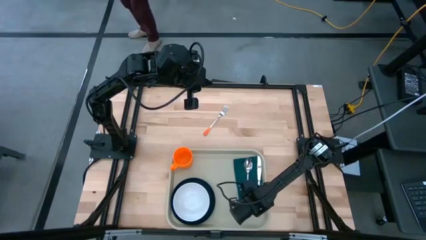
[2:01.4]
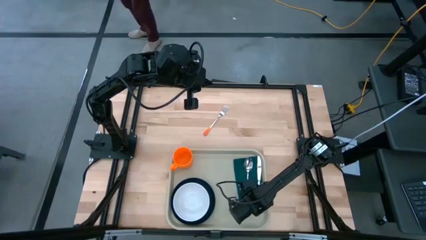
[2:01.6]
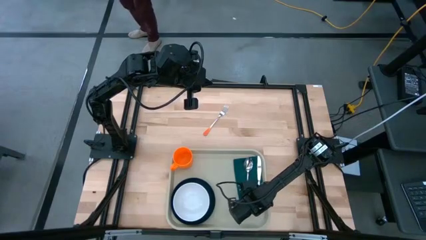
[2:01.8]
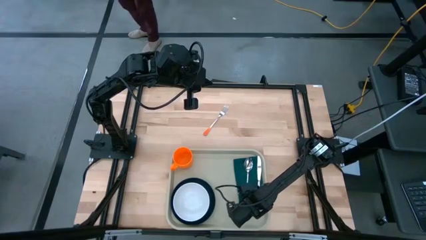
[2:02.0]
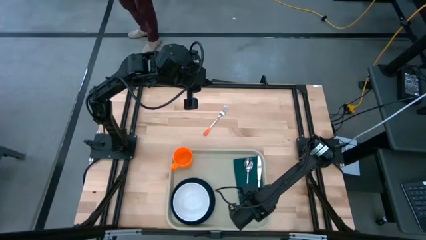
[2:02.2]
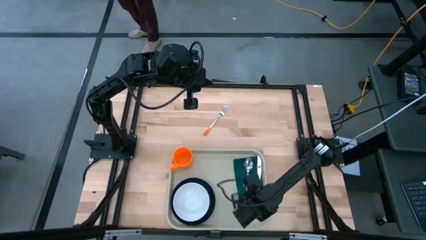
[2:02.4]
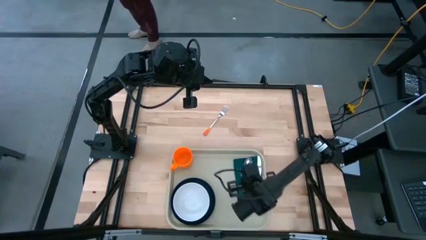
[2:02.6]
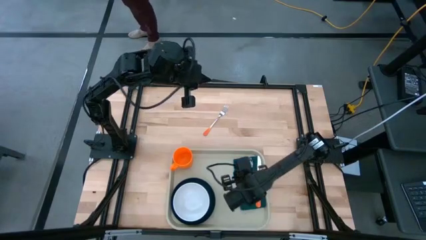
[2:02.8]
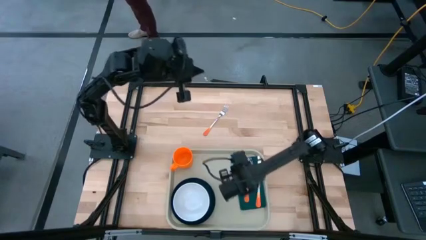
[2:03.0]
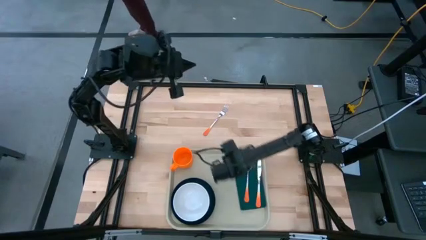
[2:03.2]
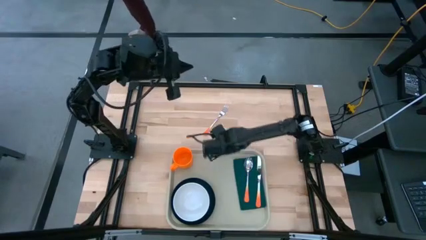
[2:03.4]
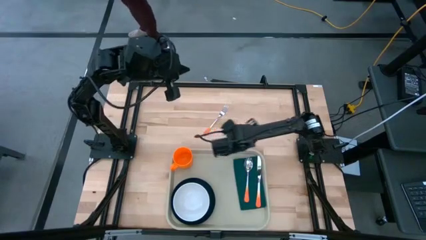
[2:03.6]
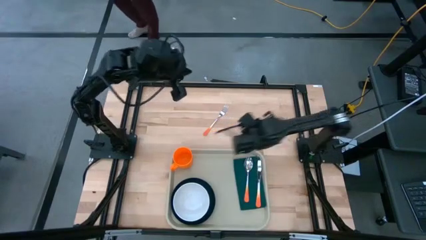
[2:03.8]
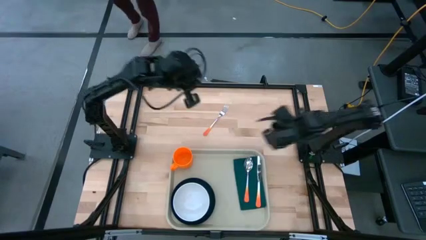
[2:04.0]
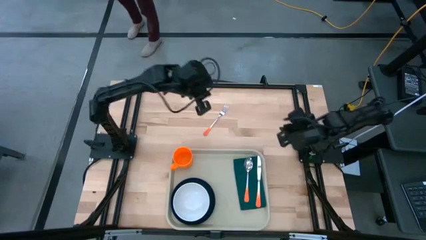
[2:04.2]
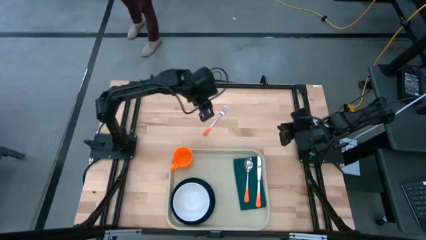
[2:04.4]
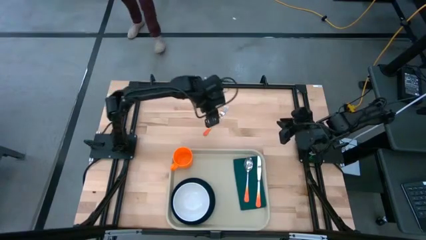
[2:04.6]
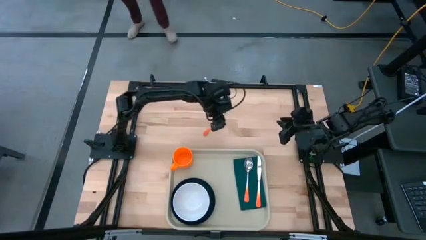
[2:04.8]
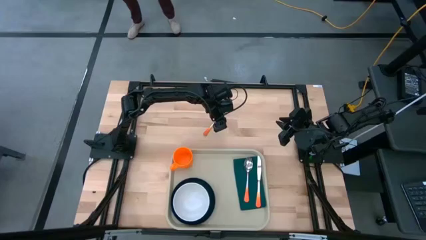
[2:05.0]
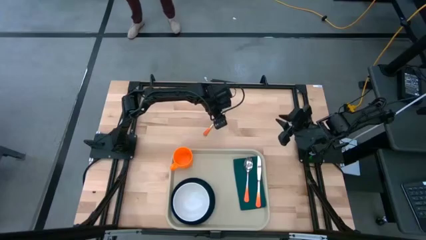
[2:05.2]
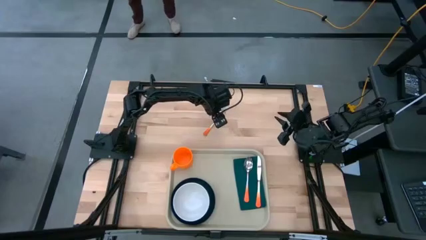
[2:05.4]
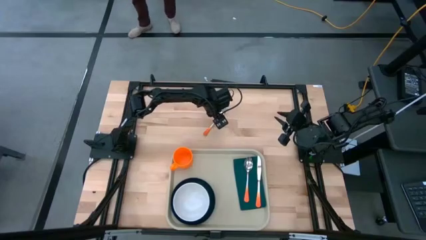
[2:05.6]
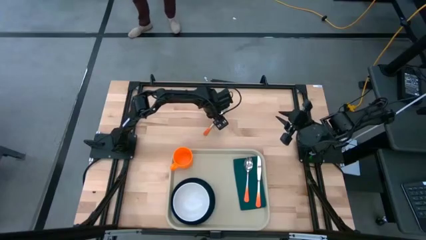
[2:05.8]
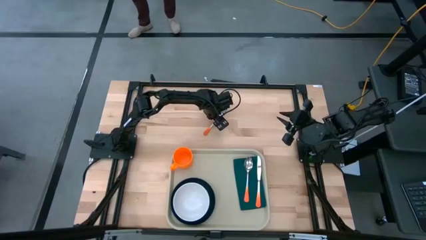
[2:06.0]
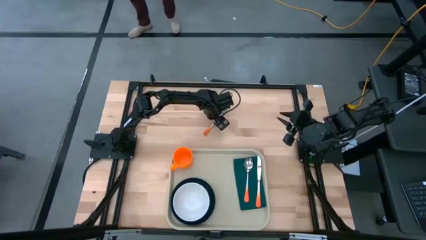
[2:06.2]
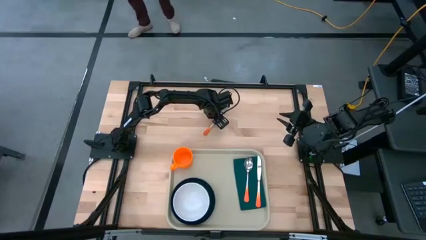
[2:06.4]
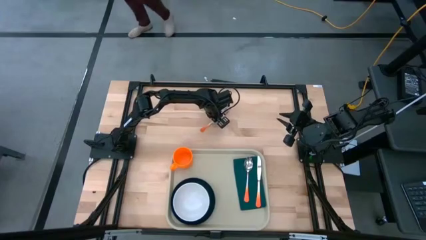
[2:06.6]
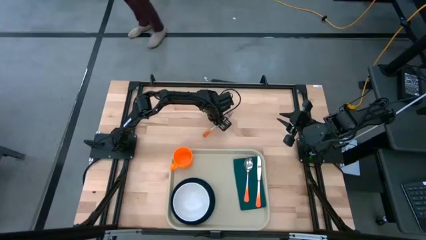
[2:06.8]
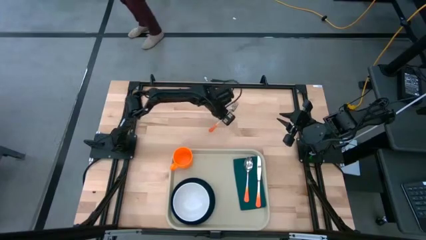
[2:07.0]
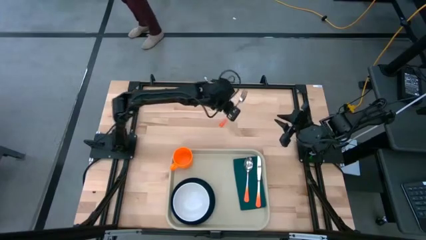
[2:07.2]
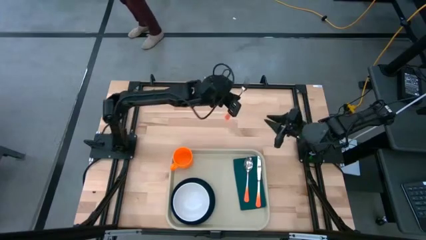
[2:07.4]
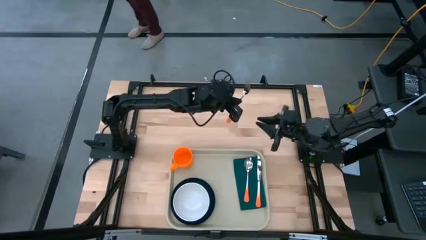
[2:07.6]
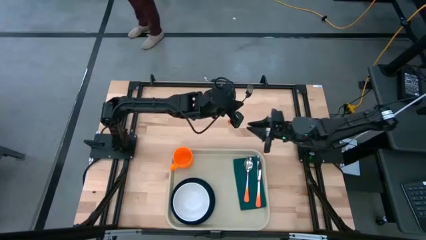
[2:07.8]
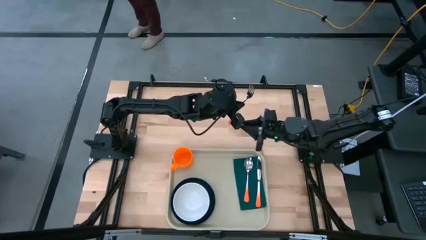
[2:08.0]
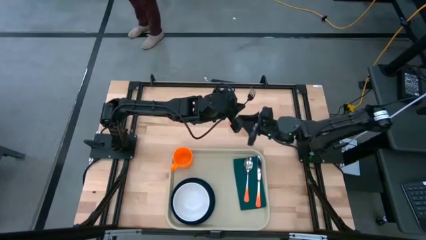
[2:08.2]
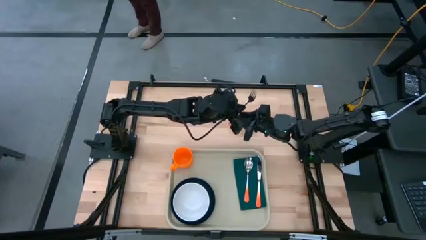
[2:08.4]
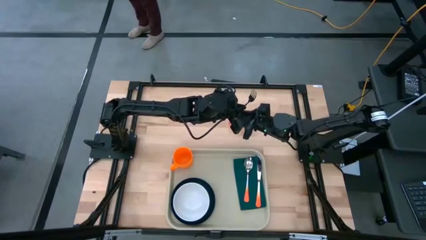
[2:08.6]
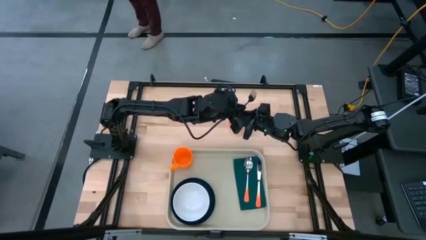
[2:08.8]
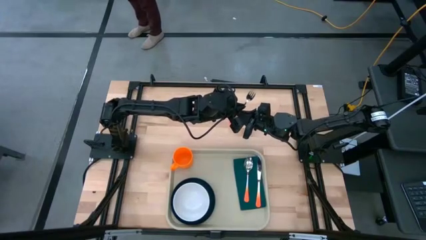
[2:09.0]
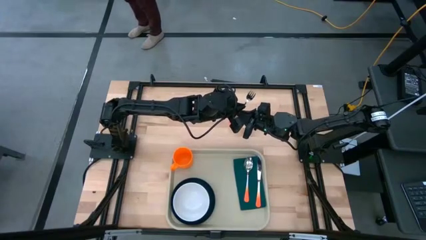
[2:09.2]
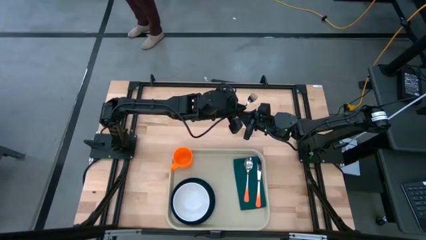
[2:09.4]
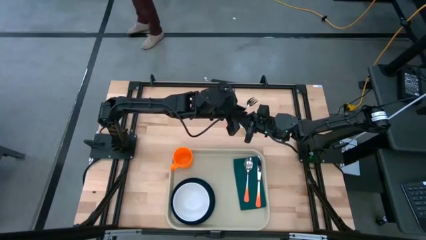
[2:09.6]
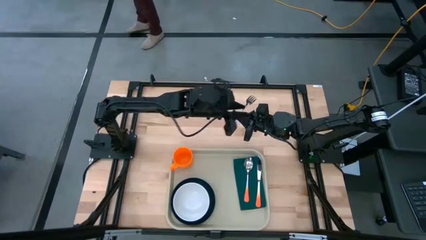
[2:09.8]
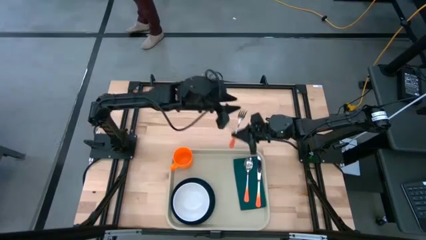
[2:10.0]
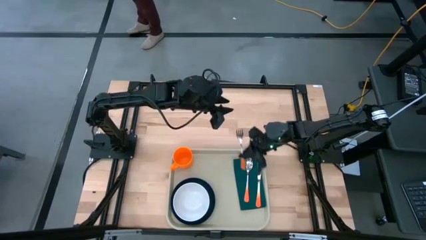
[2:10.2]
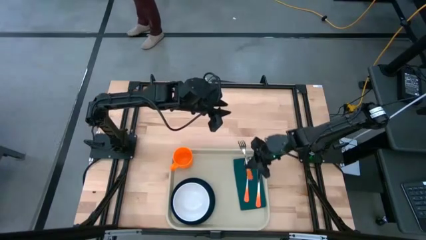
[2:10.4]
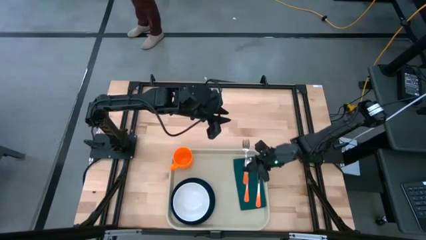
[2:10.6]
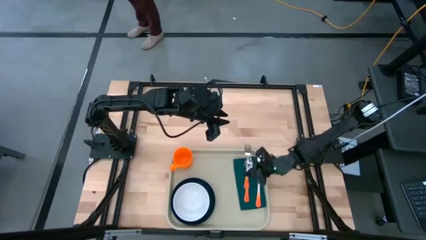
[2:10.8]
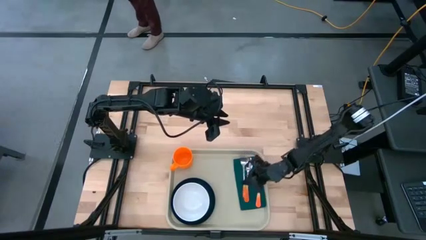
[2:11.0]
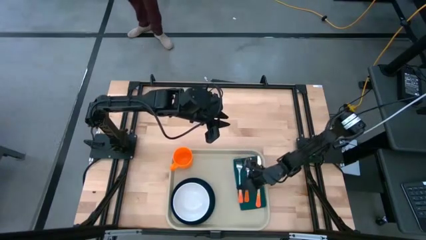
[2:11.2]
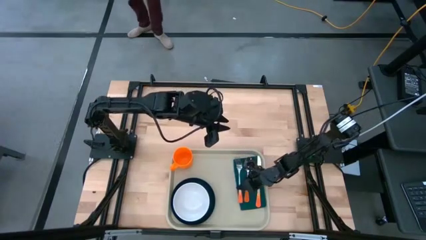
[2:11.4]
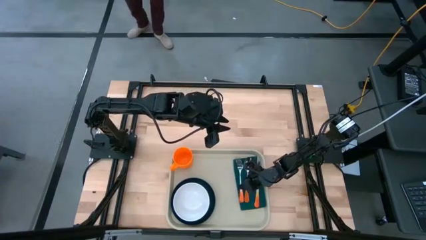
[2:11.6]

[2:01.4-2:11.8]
Task: Set up tray
Put the orange fork on the green napkin to the left of the orange spoon
